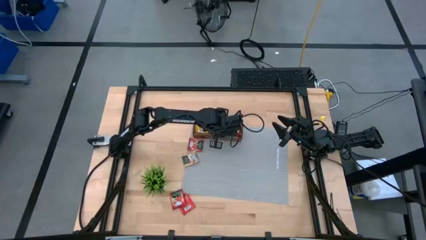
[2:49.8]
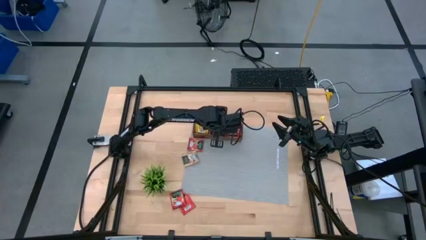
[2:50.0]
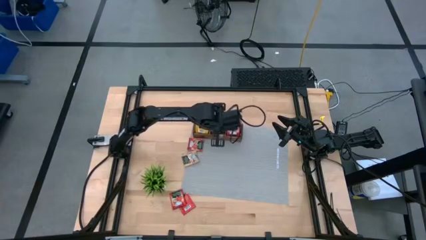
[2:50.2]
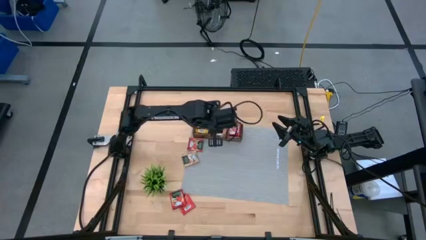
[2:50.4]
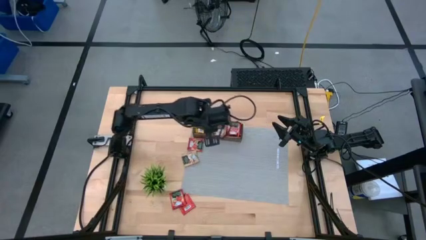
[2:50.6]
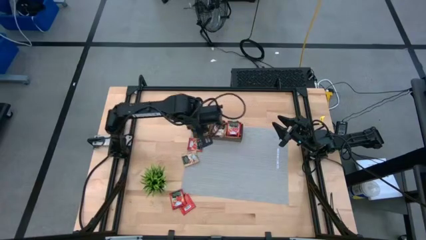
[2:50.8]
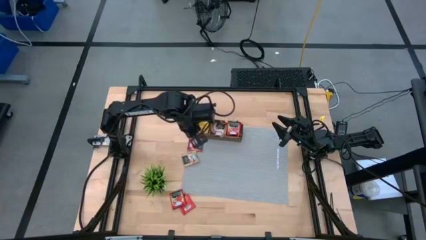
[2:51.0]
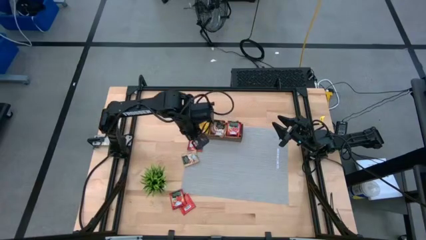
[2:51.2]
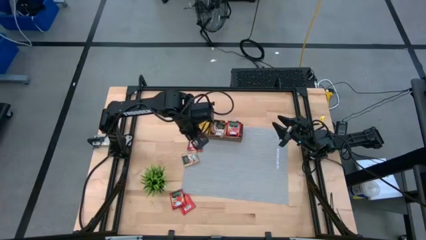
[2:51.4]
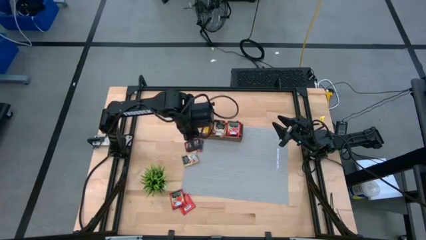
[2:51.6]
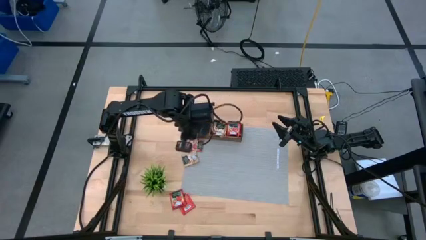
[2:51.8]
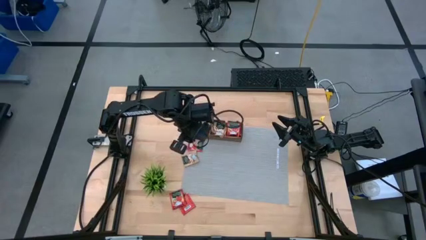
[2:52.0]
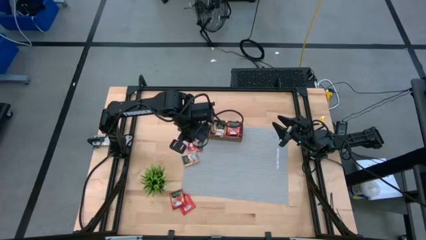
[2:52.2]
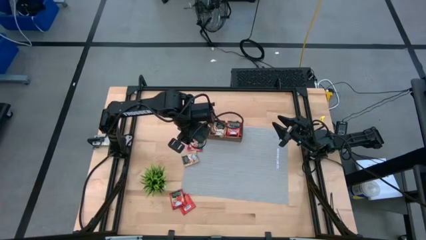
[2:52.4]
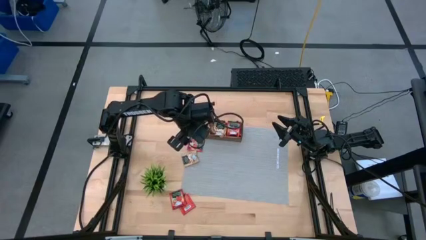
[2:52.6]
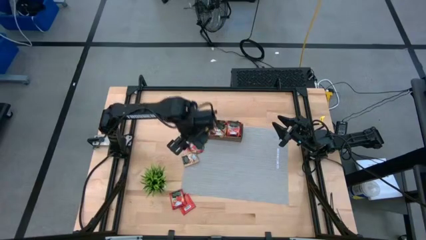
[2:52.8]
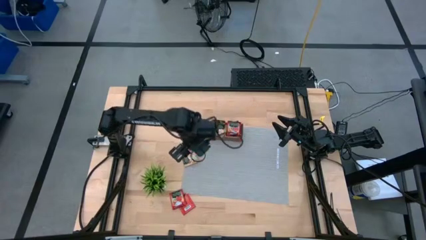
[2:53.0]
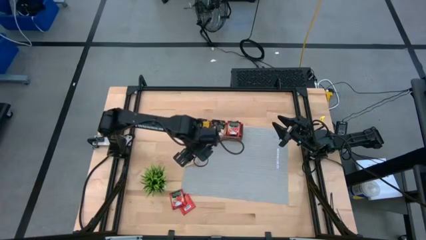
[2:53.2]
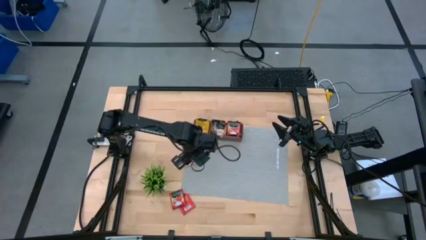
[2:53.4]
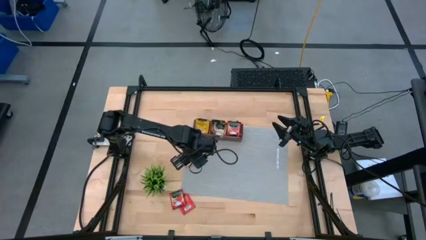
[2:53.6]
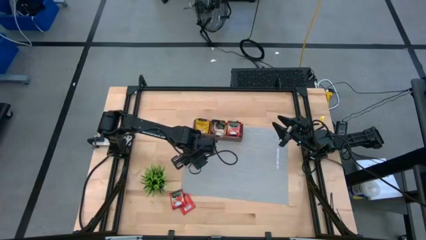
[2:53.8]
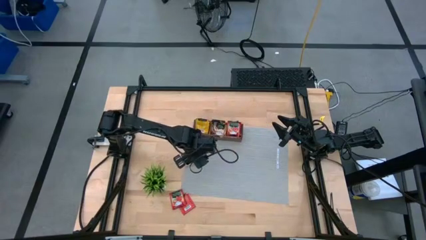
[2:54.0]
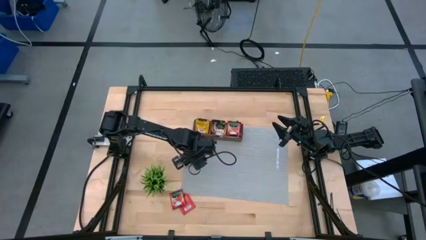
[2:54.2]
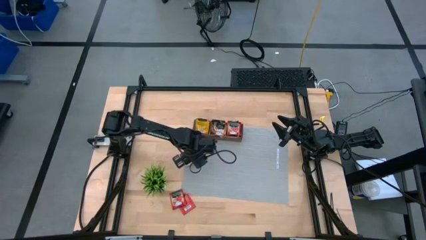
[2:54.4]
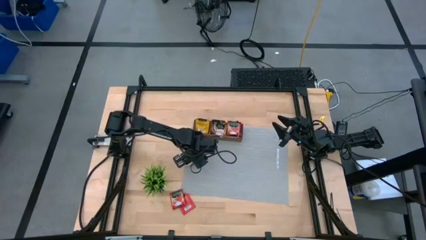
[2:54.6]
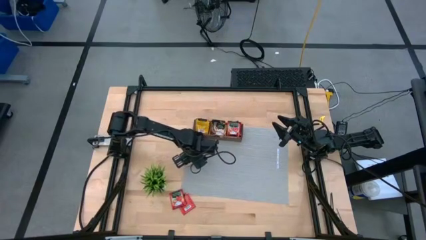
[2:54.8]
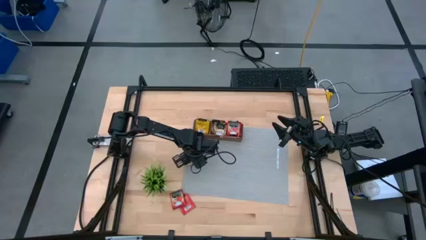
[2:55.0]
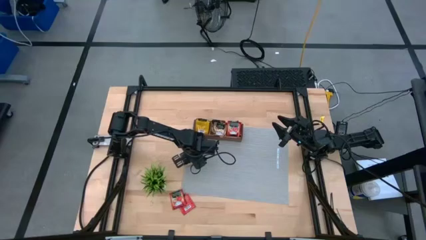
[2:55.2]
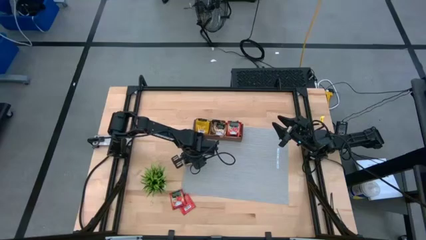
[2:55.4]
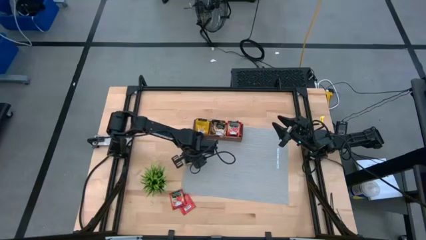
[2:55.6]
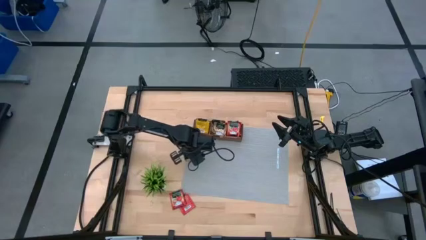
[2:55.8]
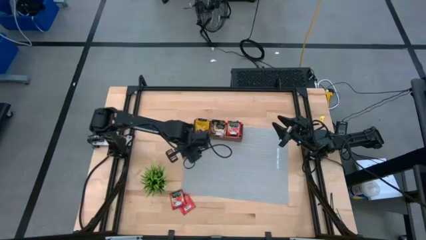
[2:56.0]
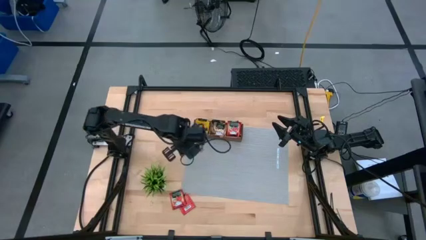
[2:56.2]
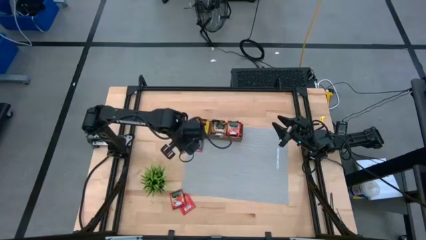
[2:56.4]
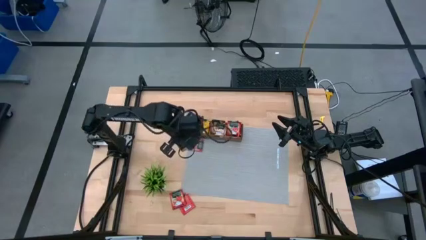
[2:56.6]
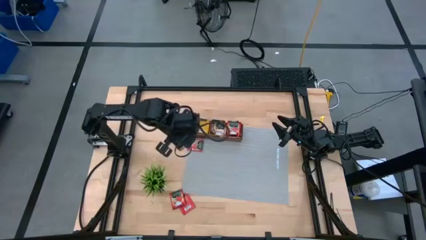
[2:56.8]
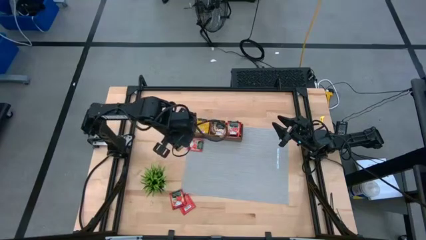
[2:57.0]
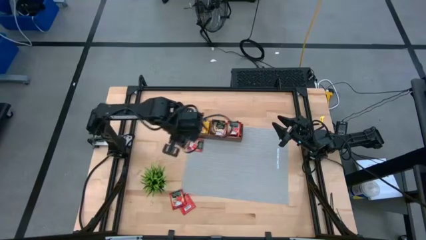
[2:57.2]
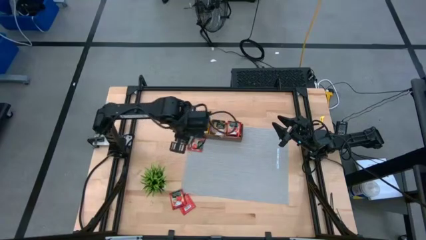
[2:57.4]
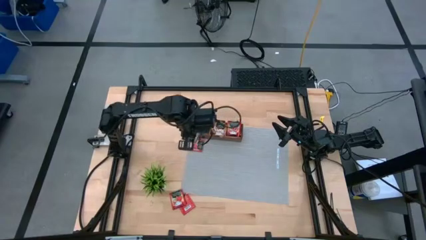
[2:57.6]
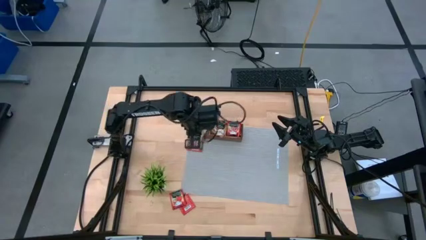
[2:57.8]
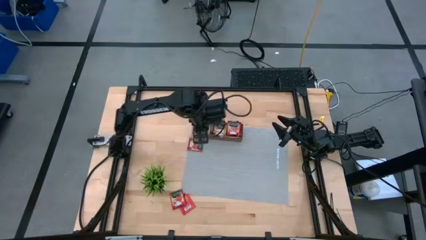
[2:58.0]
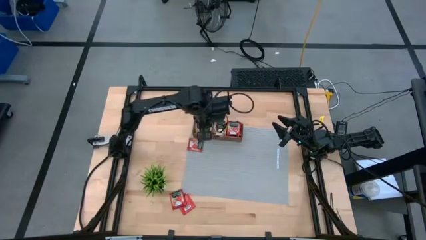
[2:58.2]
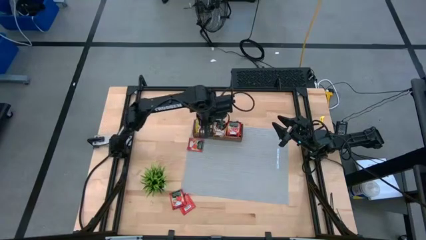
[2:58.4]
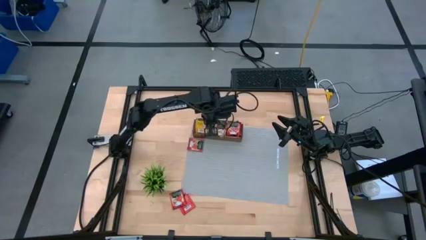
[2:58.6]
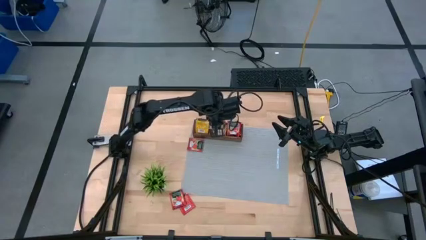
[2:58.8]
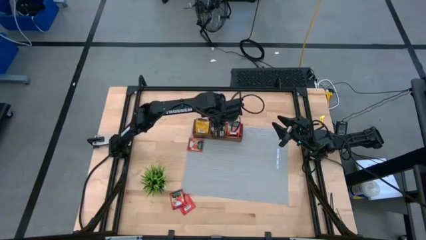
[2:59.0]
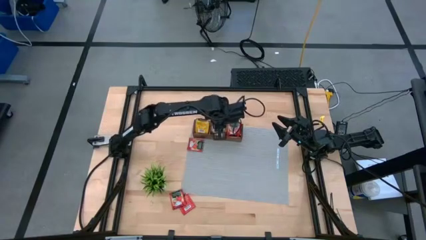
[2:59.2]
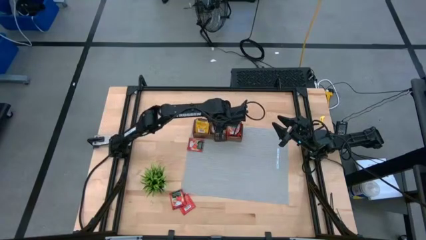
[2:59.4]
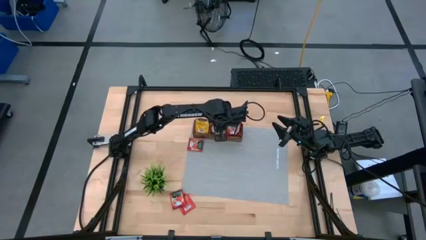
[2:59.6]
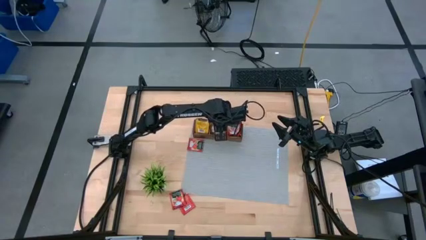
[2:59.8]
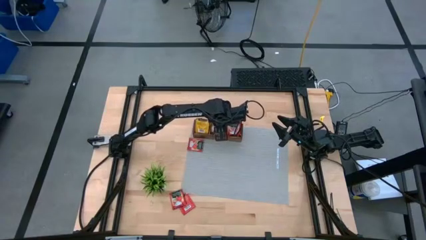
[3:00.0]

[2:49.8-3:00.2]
Task: Pick & Place Tea
Put the gold tea bag into the middle section of the wooden organizer
